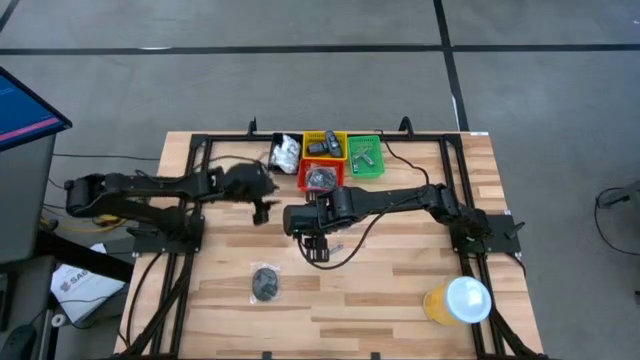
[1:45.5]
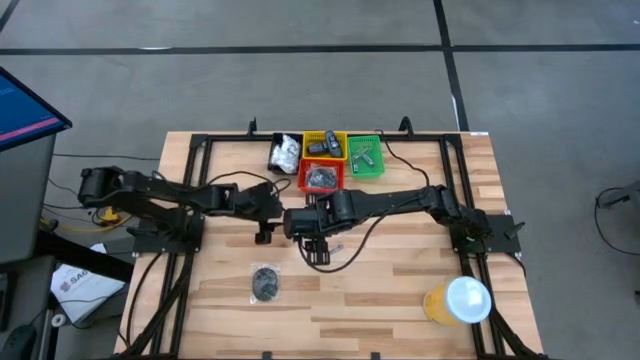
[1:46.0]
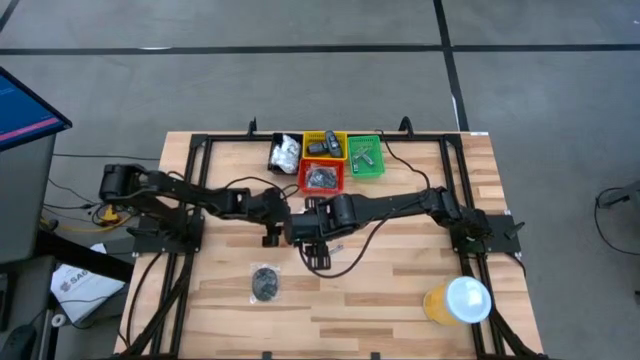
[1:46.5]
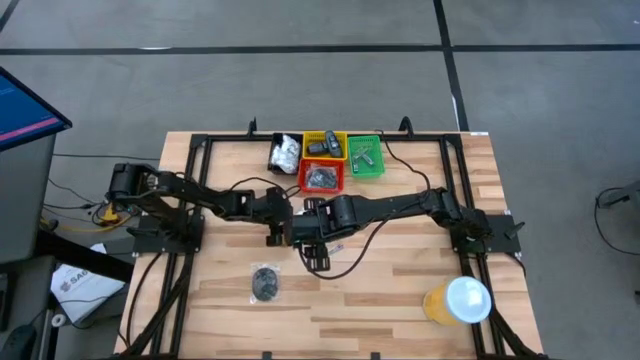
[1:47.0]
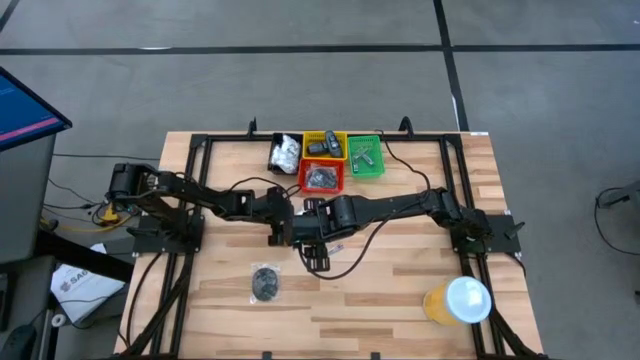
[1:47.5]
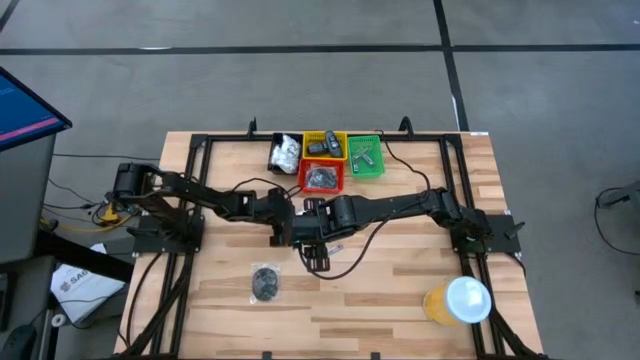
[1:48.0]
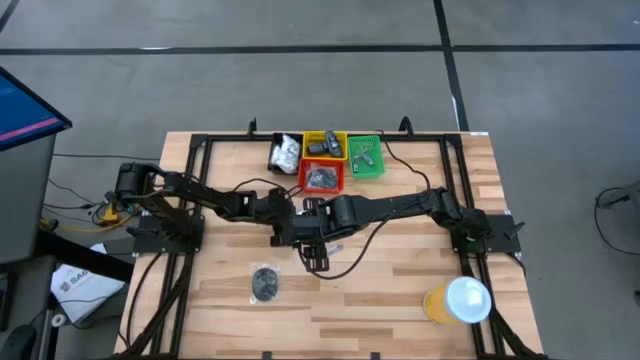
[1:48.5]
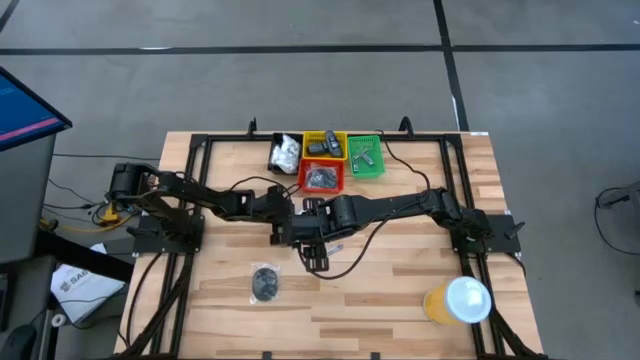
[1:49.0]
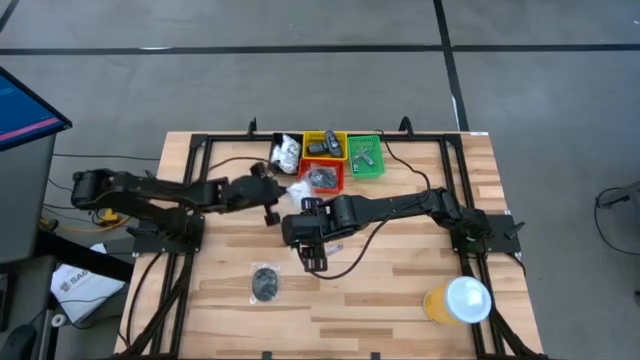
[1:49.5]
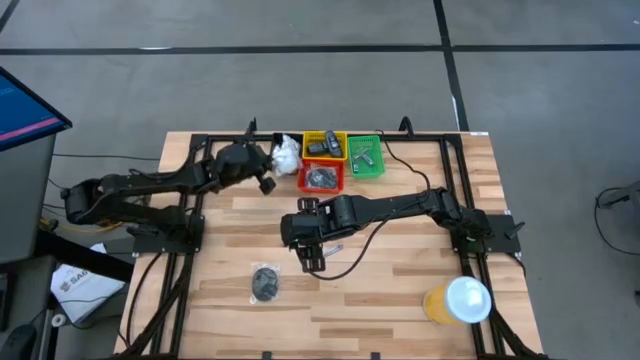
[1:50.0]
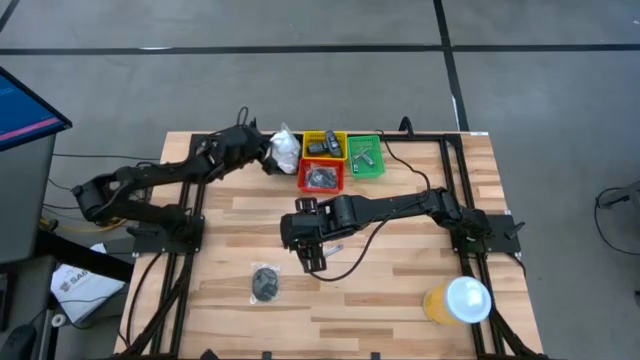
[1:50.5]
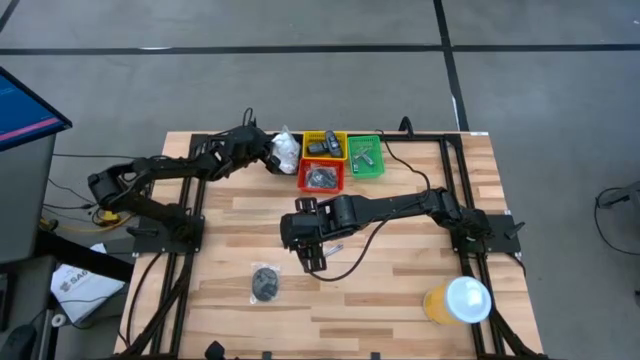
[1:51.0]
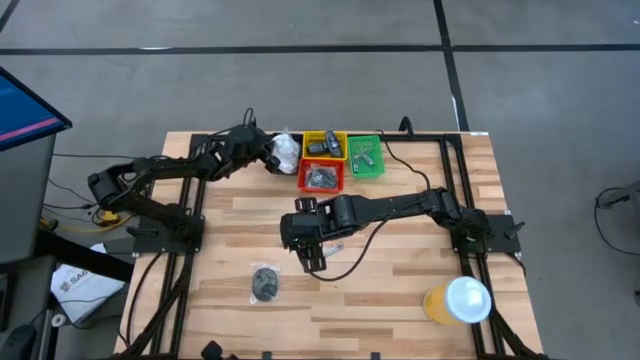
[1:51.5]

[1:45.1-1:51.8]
Task: Pick & Place Travel size toiletries
Put the cotton pack into the black bin

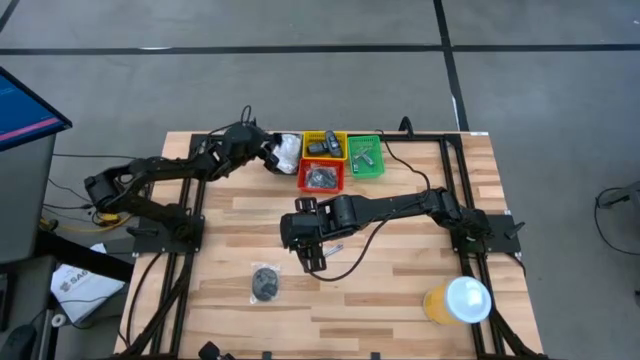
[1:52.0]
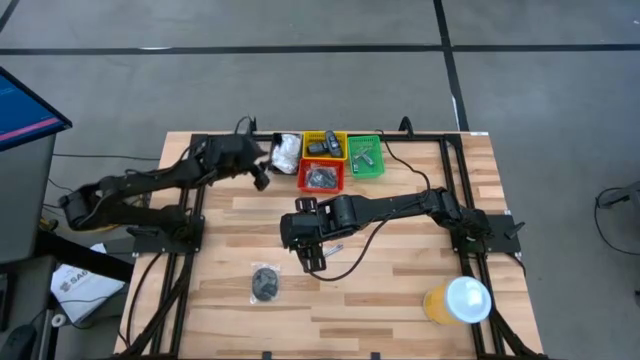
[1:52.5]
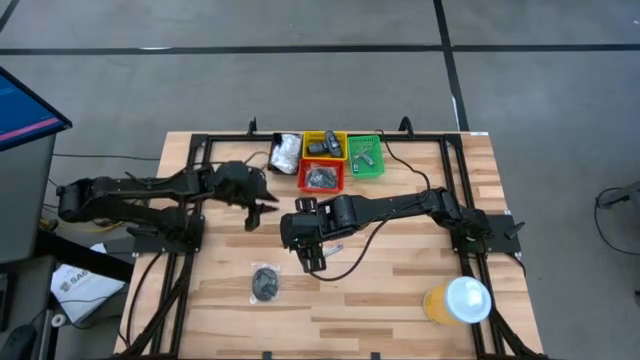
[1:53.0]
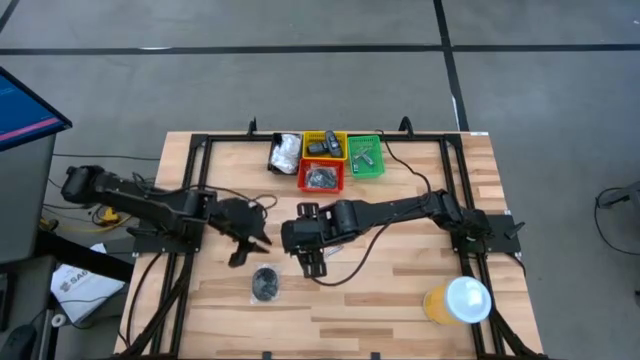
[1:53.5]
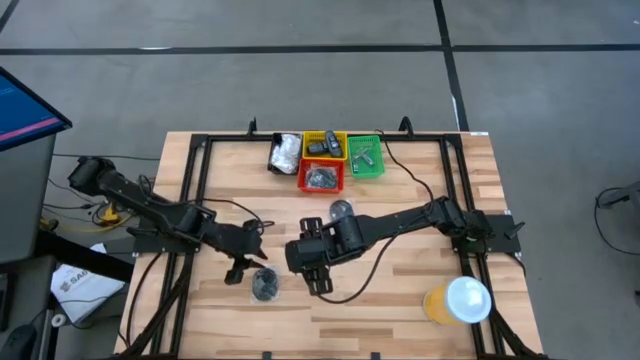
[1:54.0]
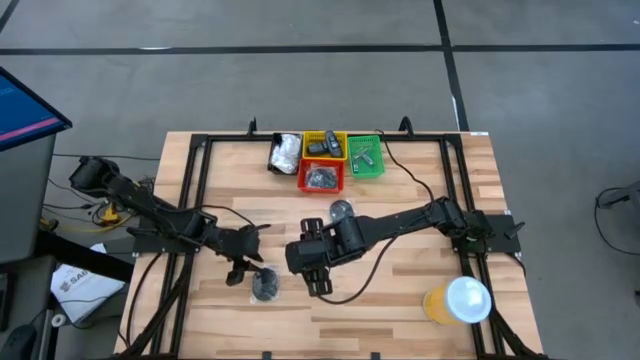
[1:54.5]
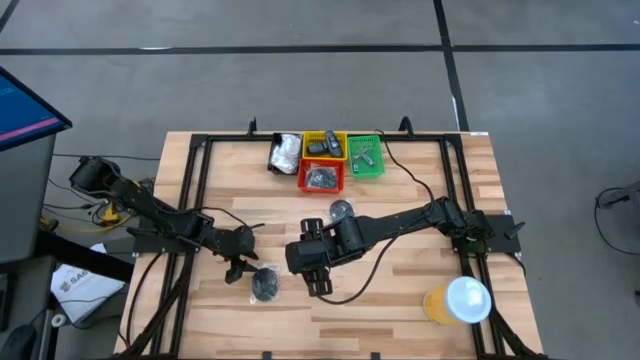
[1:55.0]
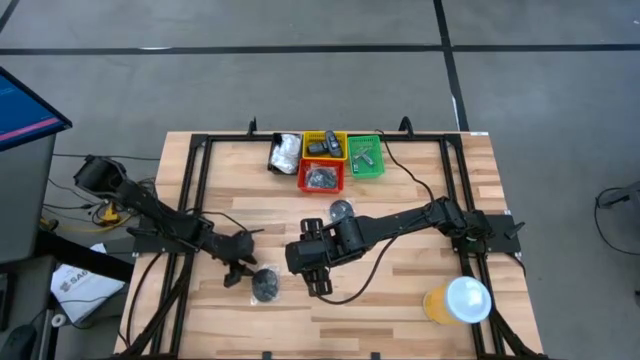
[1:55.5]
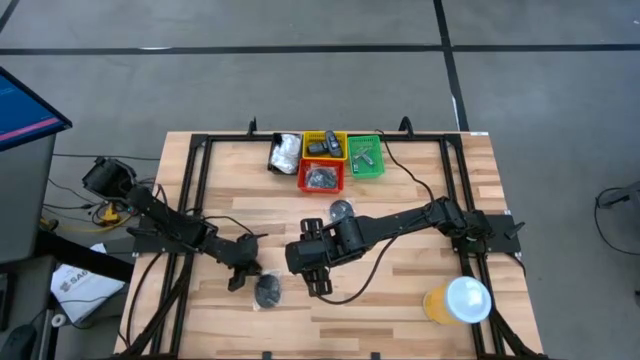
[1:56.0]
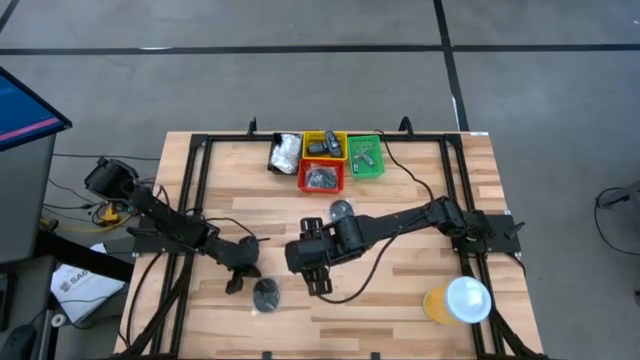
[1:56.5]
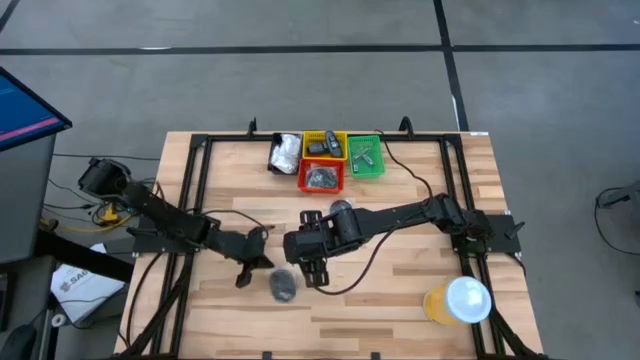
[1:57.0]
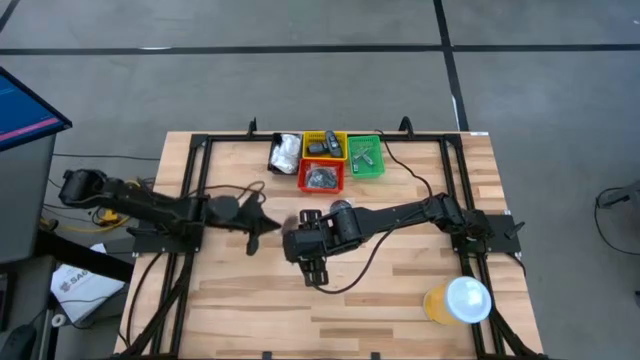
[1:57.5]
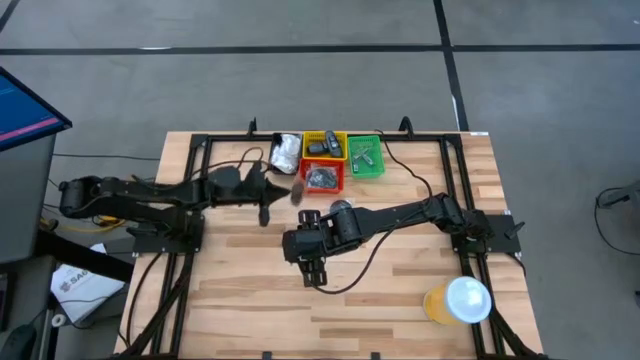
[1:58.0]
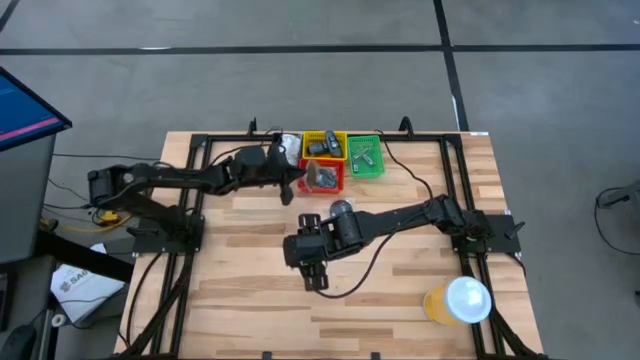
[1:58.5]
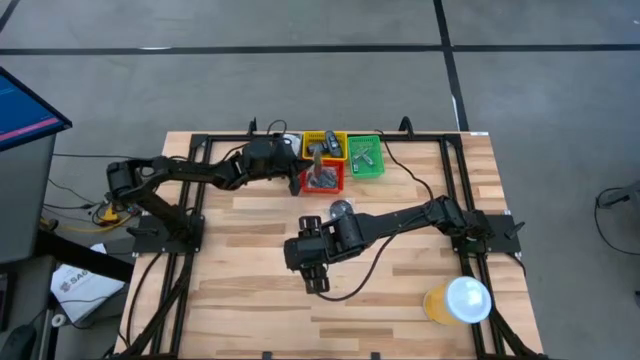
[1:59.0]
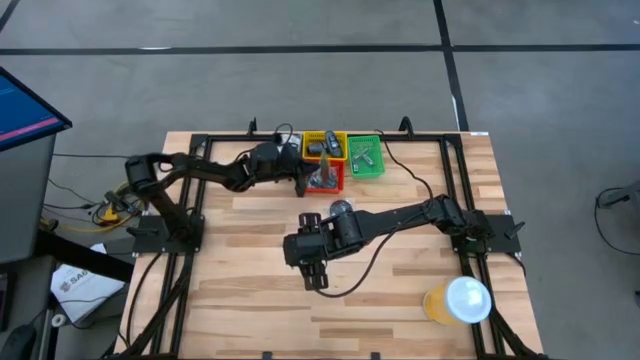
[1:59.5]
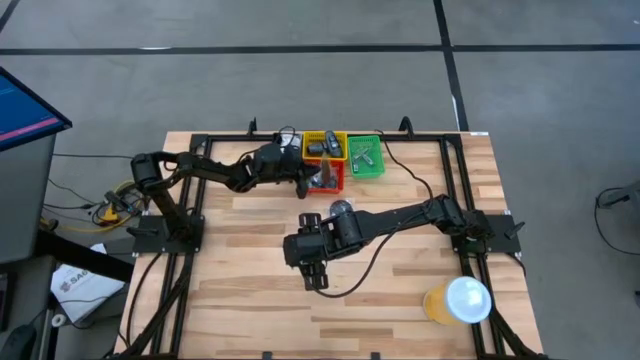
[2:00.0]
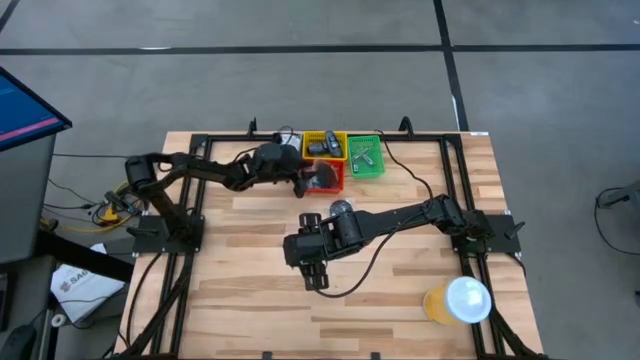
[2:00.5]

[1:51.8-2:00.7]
Put the black hairbrush into the red bin

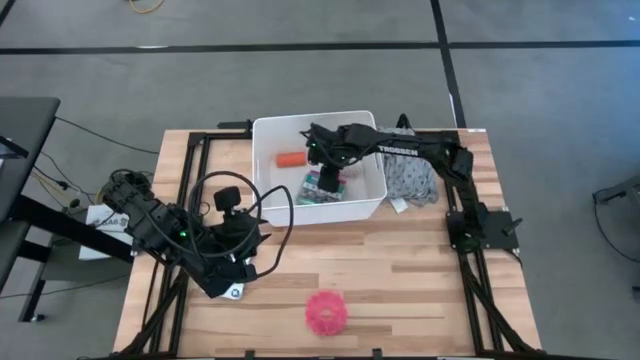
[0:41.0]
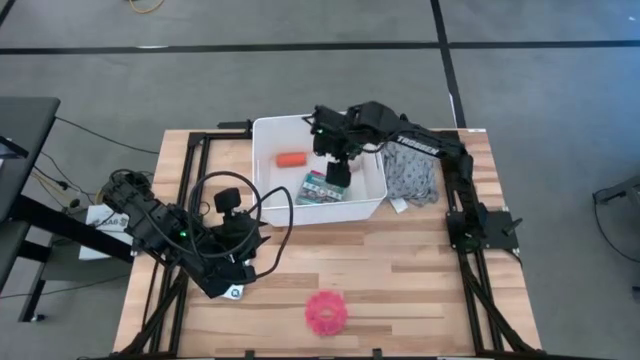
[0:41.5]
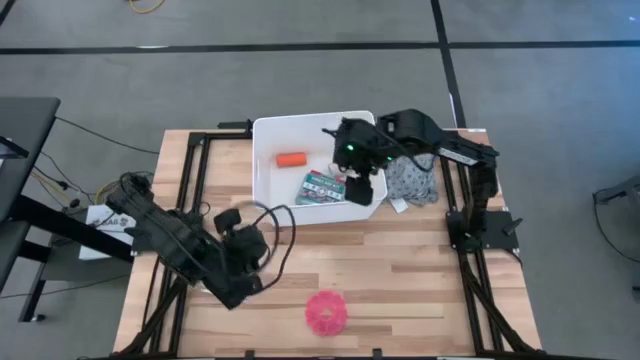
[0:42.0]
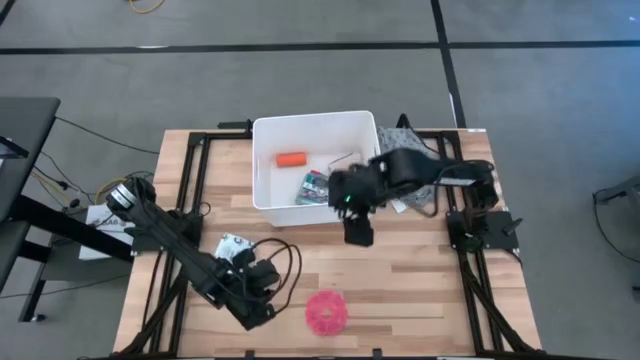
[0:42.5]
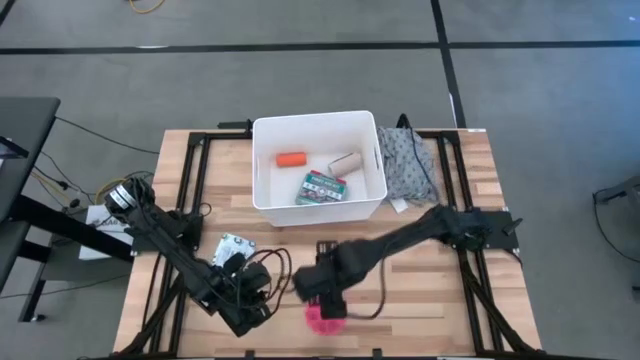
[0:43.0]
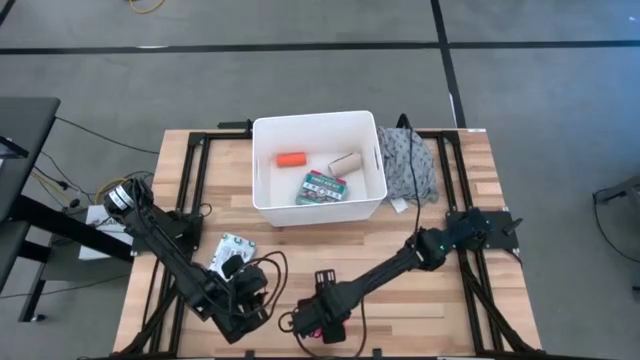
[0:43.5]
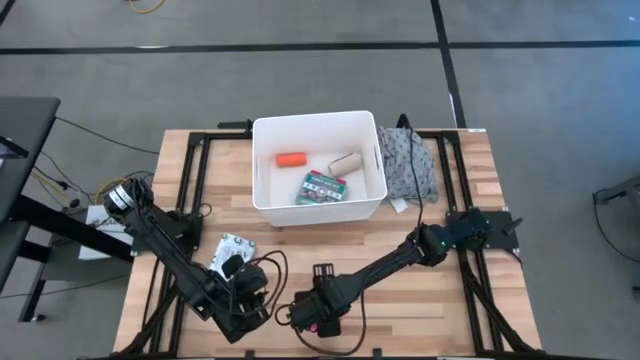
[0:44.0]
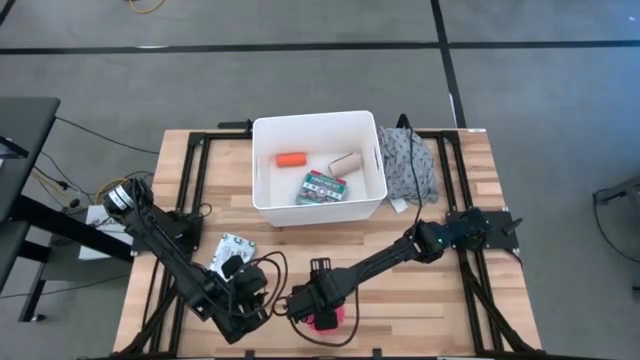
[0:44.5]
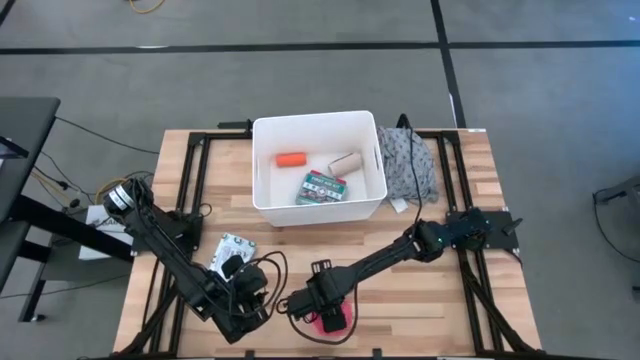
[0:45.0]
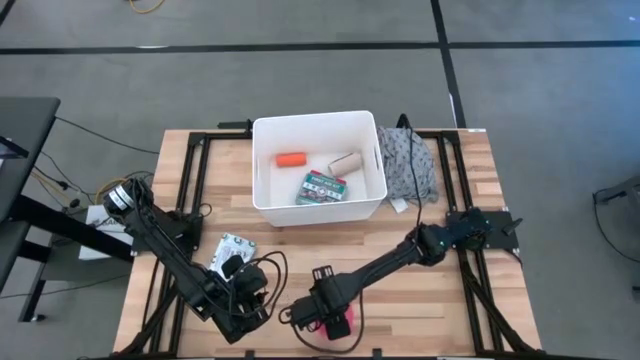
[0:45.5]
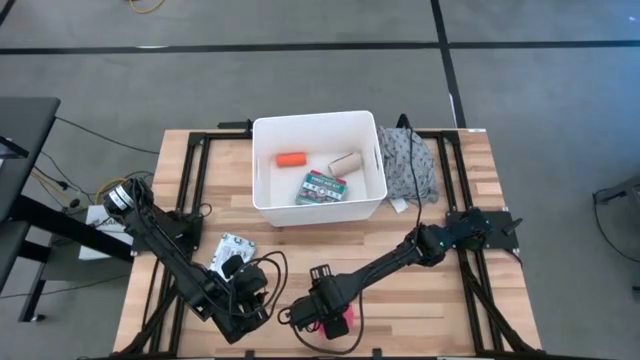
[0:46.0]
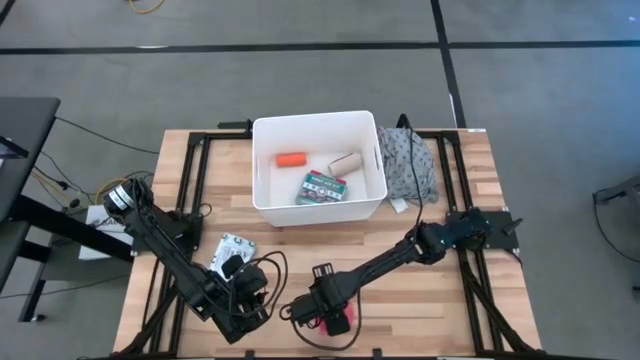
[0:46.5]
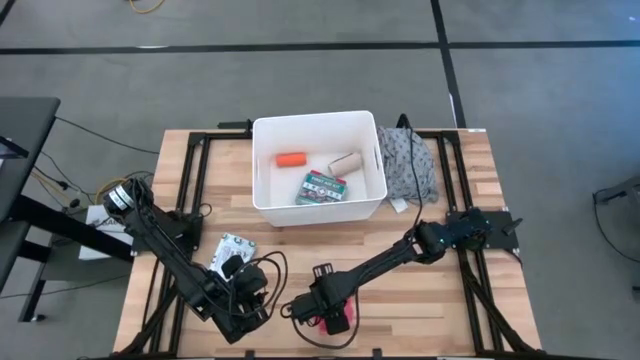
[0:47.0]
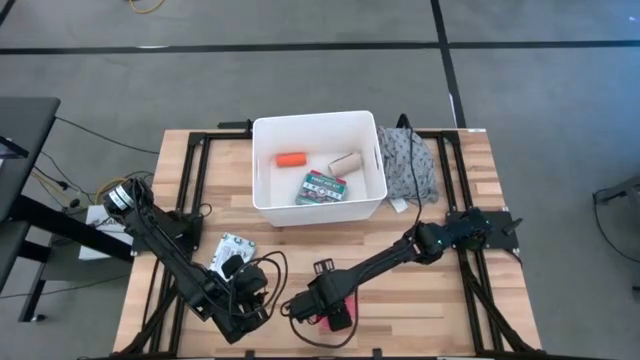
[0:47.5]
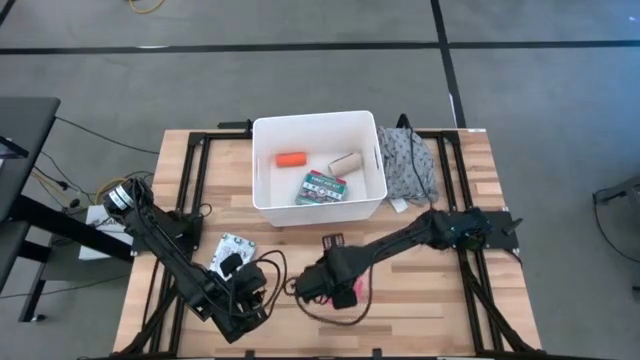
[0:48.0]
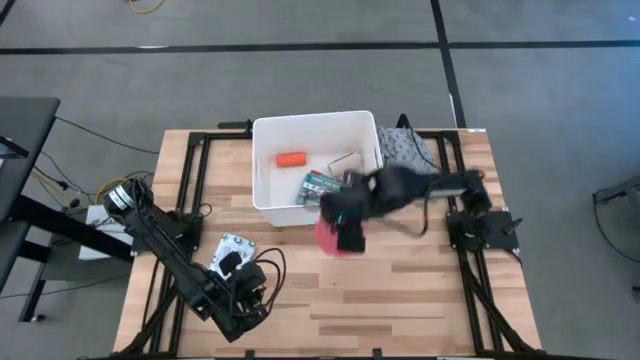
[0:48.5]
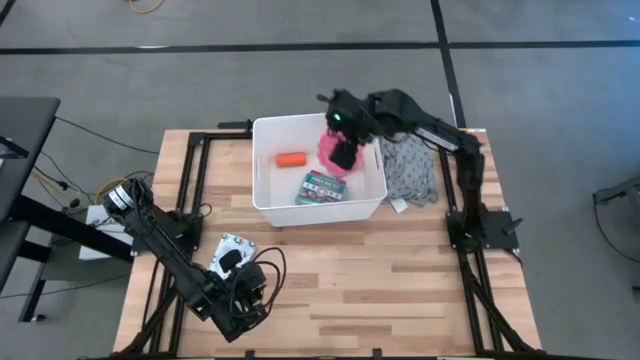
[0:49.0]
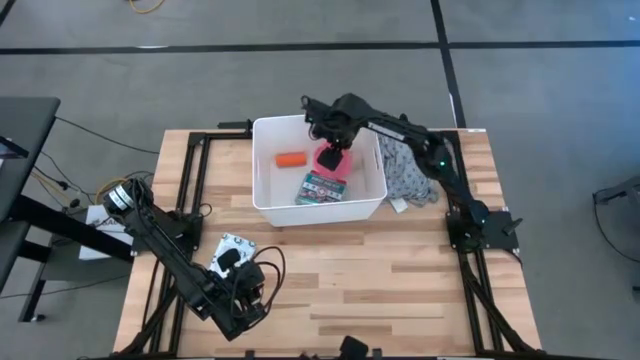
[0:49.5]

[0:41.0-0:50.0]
Task: Pick & place medical supplies in basket/bin
Put the pink pill organizer into the white bin
